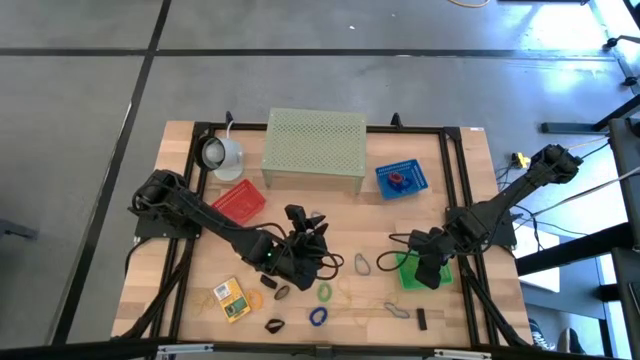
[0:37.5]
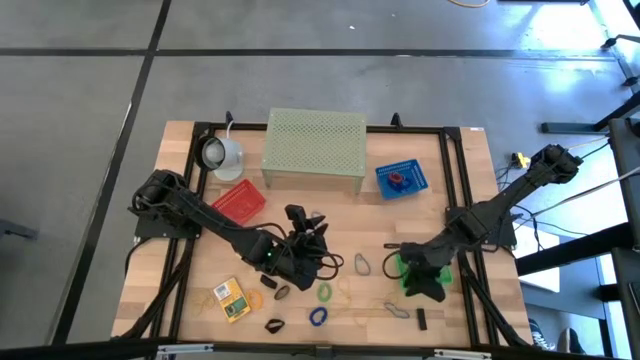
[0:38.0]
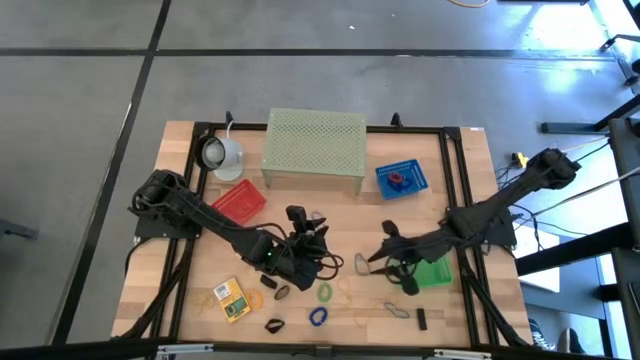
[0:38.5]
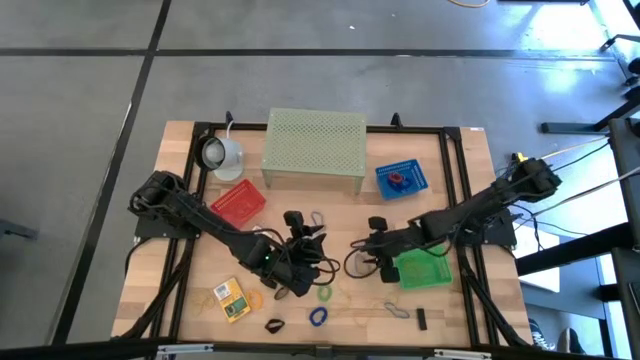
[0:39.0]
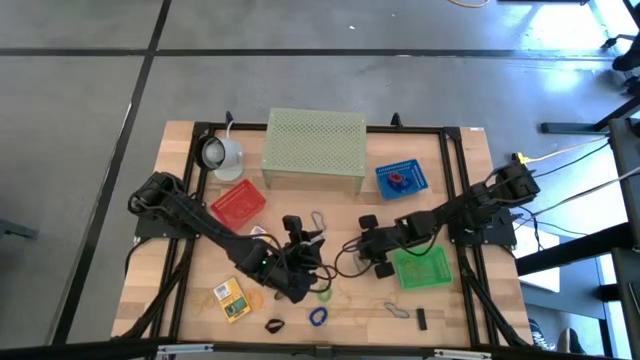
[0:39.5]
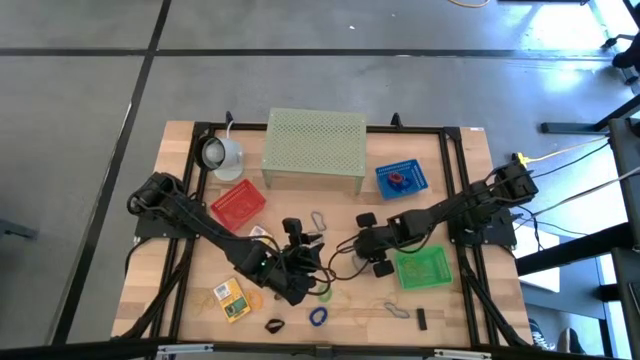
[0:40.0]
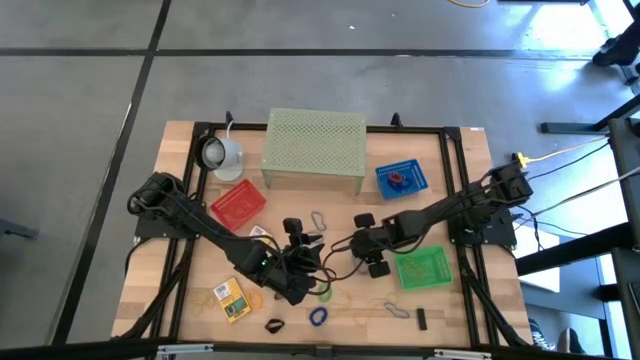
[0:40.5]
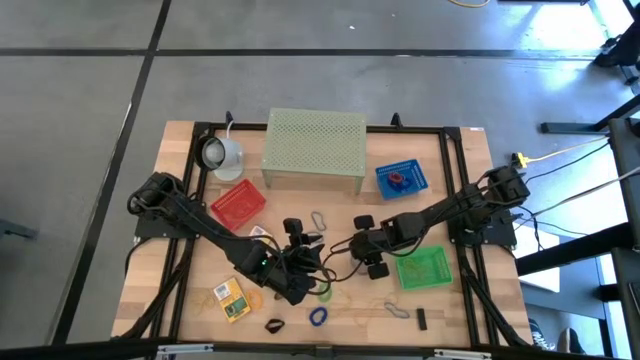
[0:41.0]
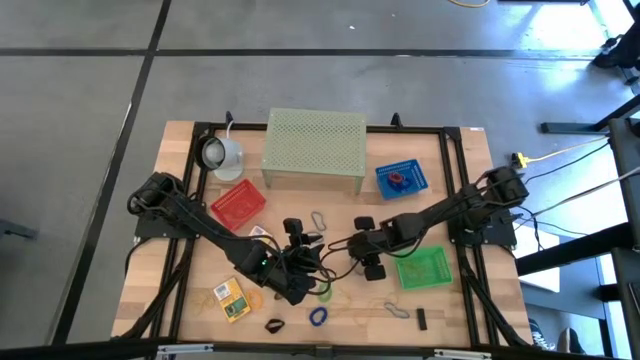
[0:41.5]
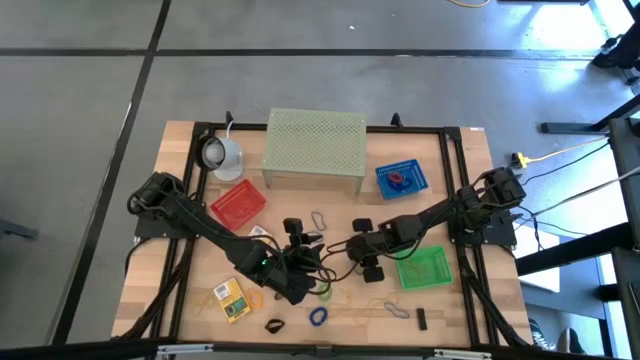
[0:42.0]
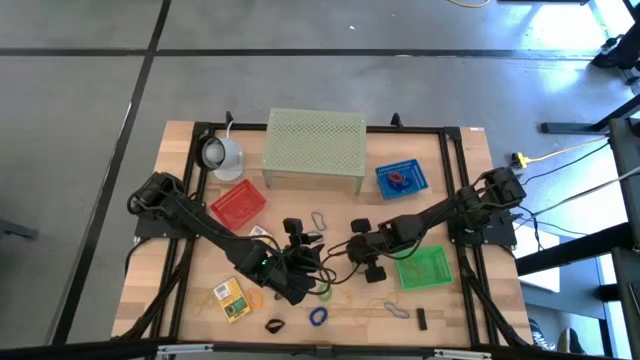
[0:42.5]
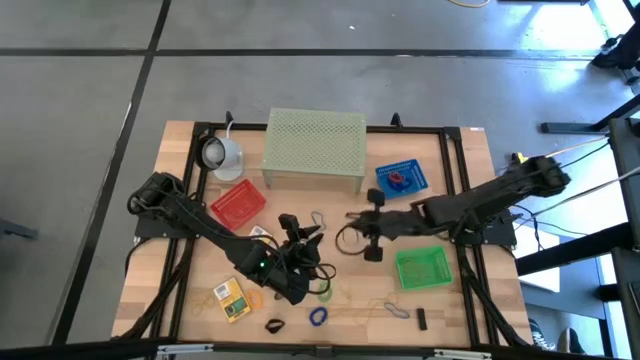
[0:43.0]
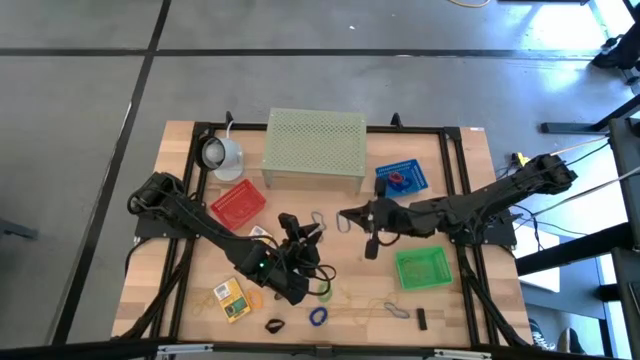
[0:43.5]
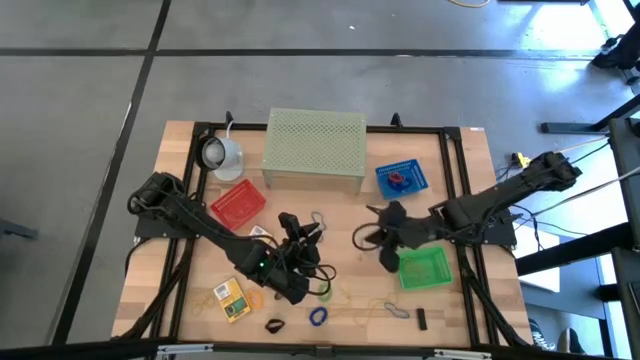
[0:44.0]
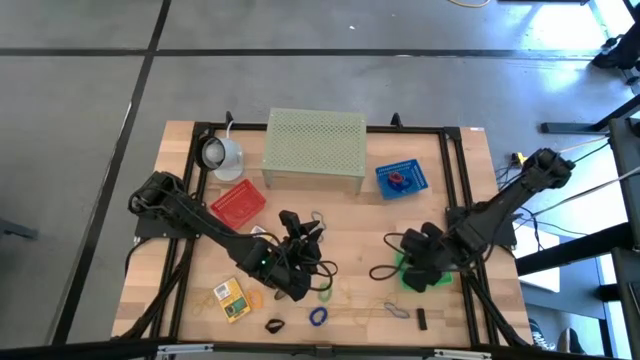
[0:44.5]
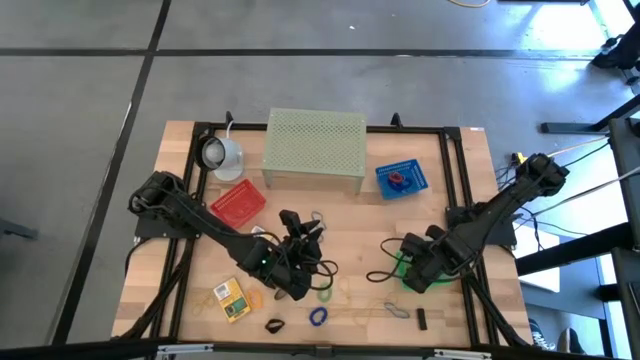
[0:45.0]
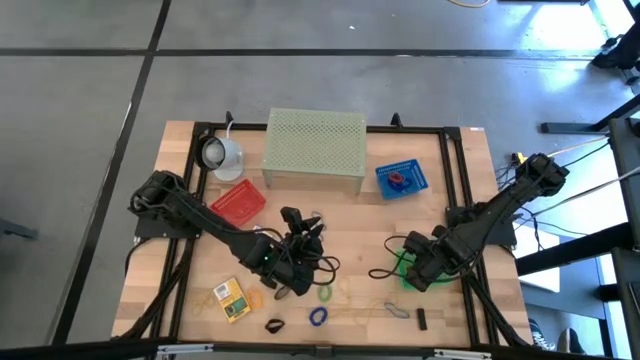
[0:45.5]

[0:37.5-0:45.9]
Task: Pick & Place Office Desk Supplies
Put the blue rubber band into the green bin

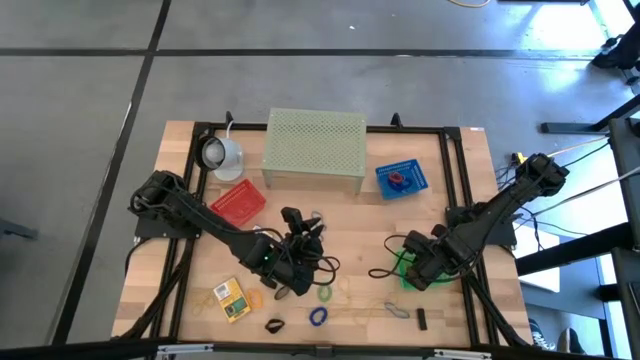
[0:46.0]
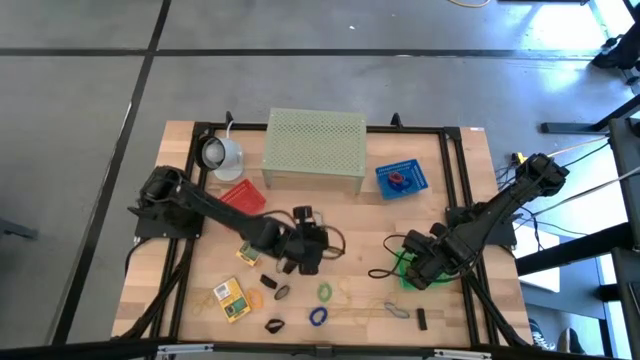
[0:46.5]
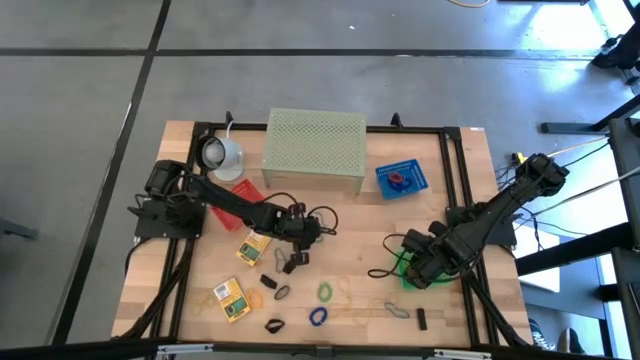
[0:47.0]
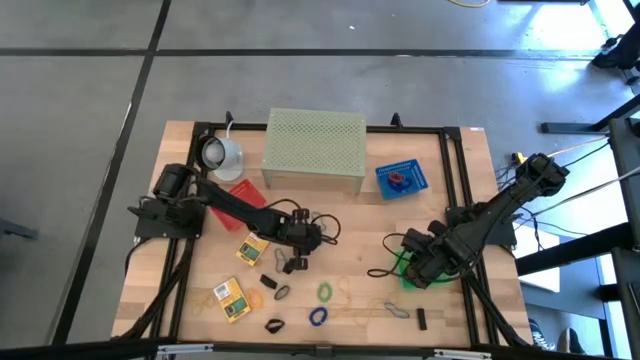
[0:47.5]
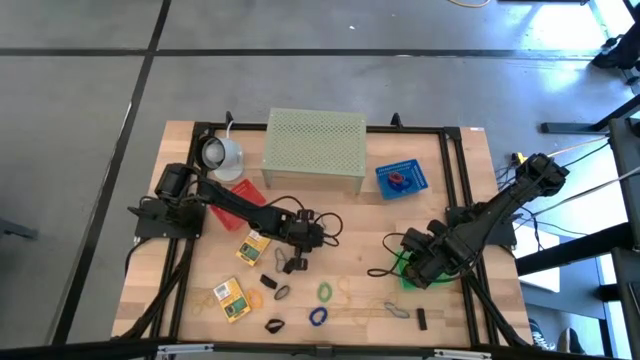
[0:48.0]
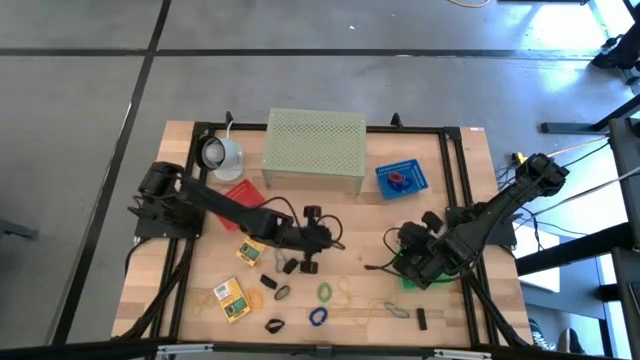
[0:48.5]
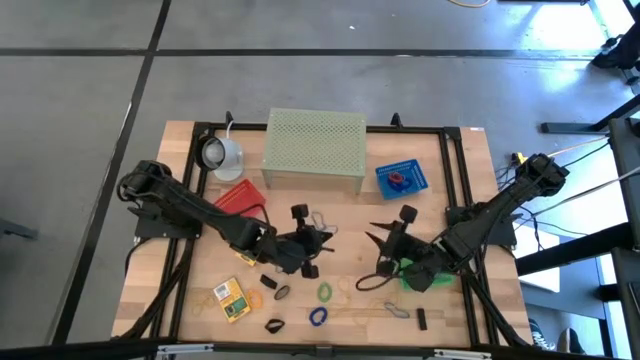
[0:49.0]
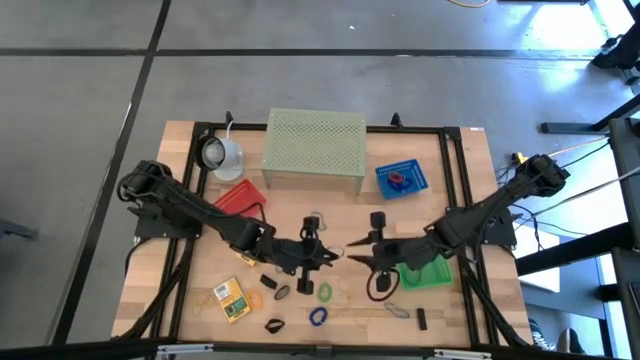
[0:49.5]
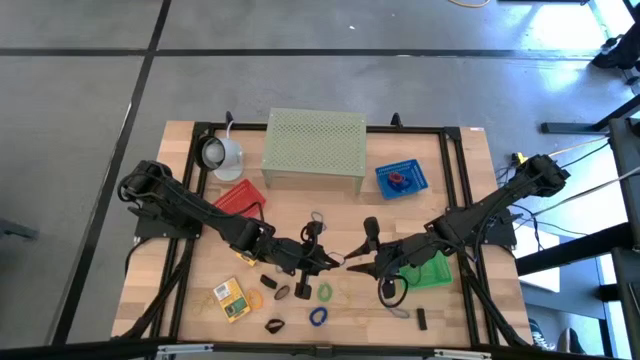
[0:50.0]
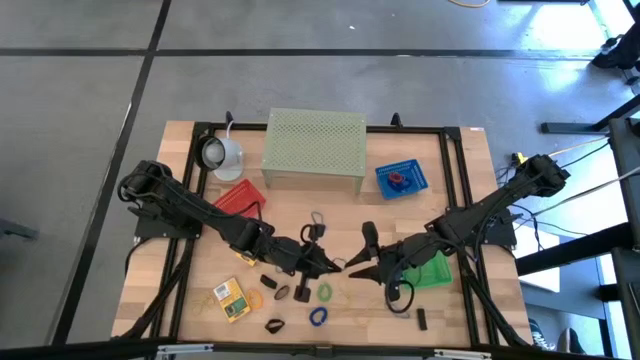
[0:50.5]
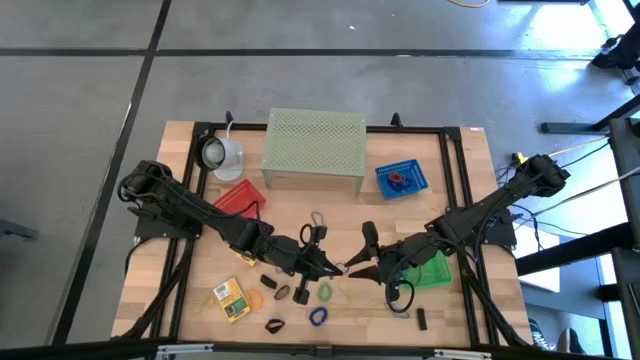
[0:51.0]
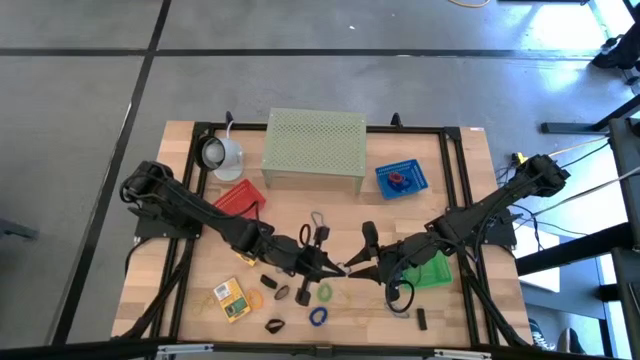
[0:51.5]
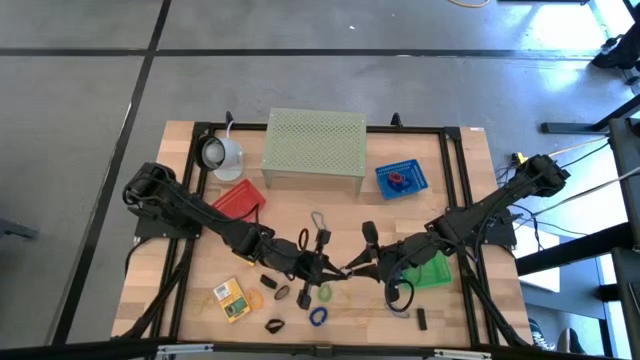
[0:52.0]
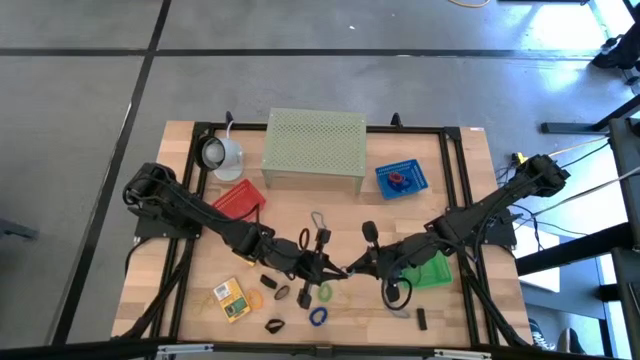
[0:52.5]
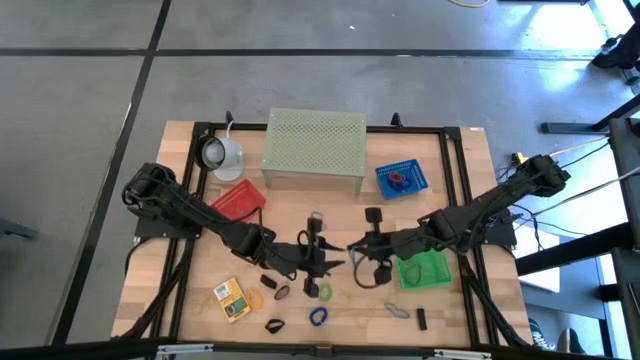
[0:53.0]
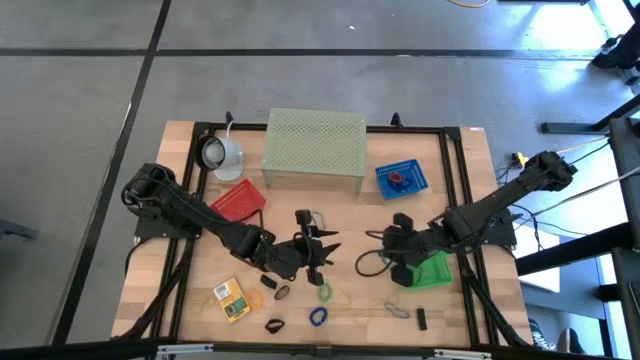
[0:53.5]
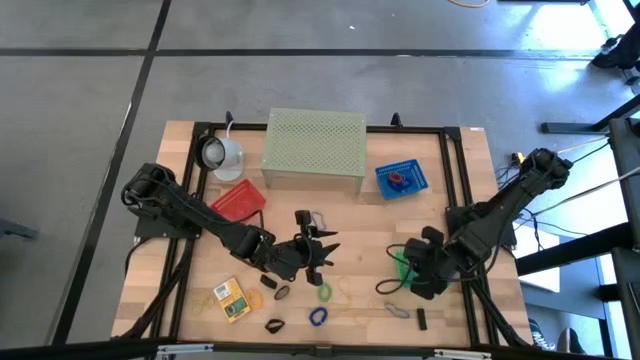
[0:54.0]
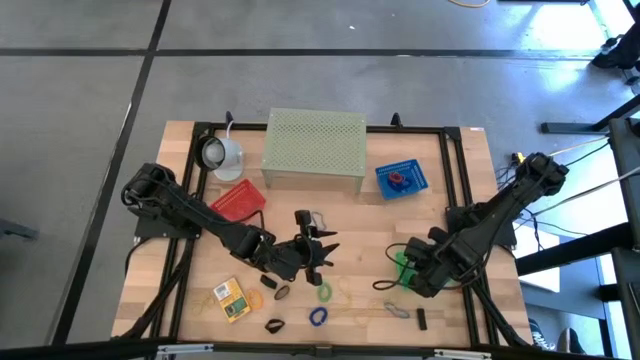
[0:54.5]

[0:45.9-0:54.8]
Put the blue rubber band into the green bin

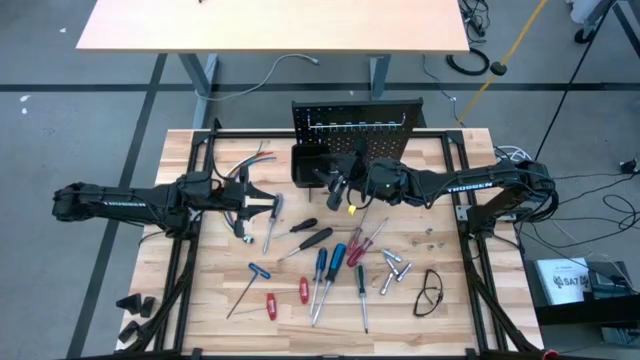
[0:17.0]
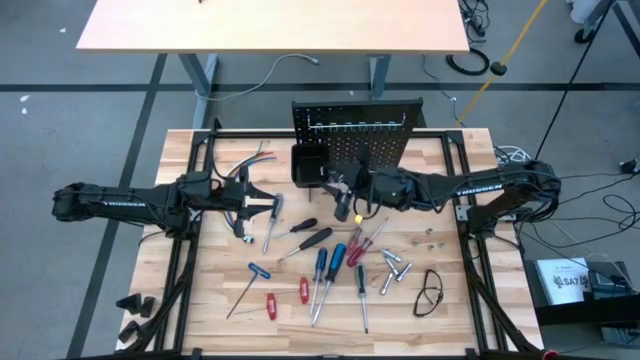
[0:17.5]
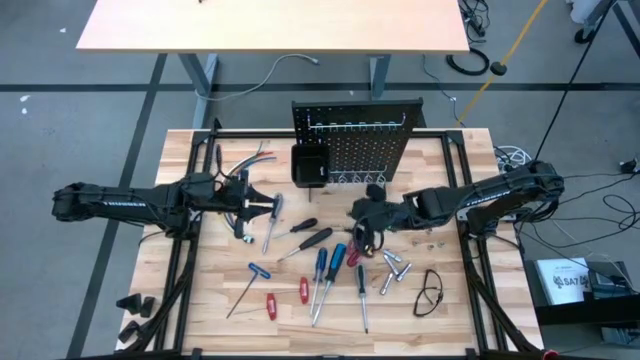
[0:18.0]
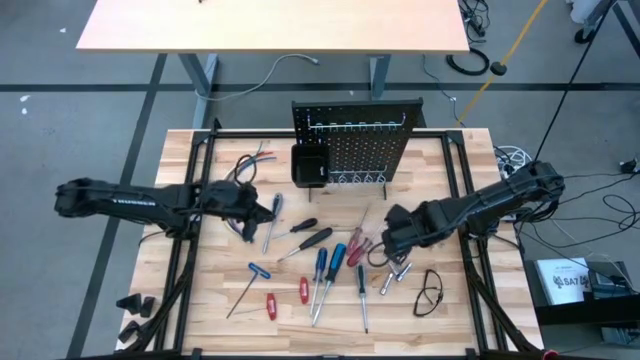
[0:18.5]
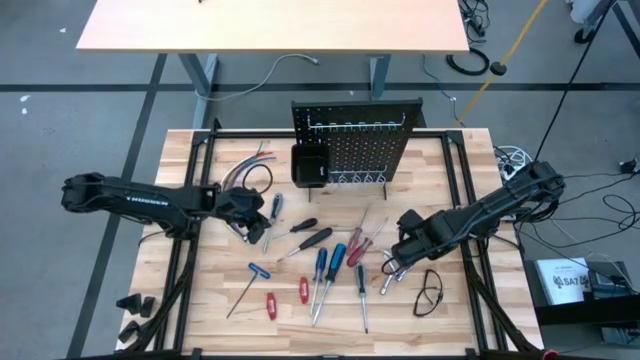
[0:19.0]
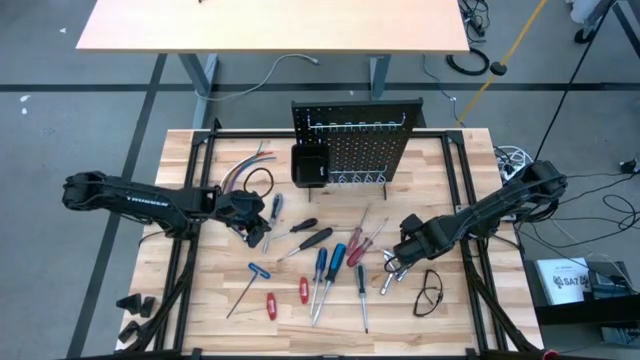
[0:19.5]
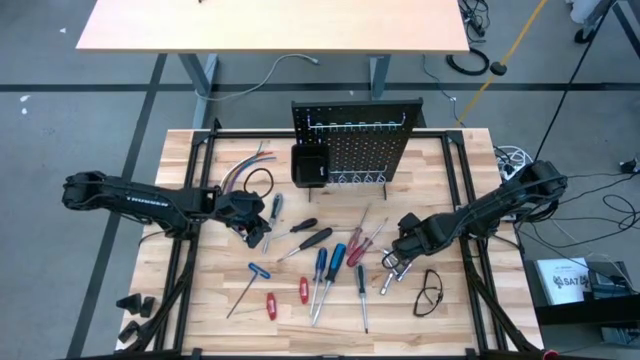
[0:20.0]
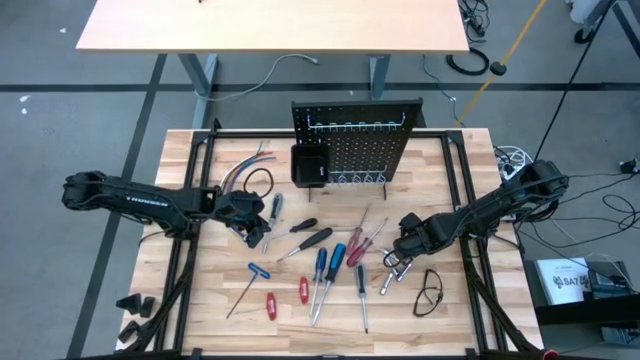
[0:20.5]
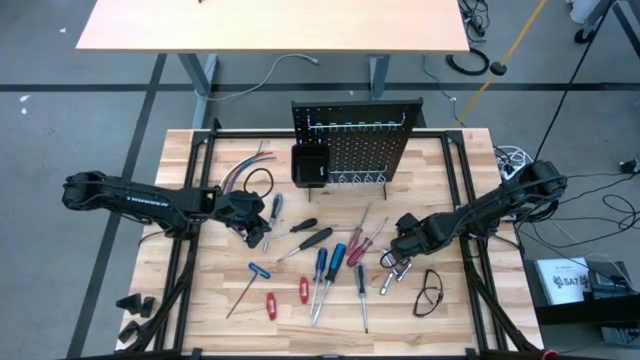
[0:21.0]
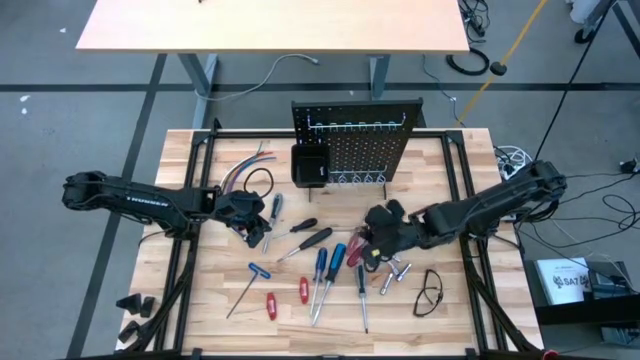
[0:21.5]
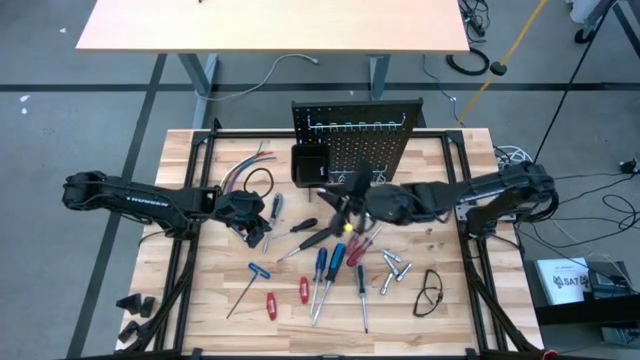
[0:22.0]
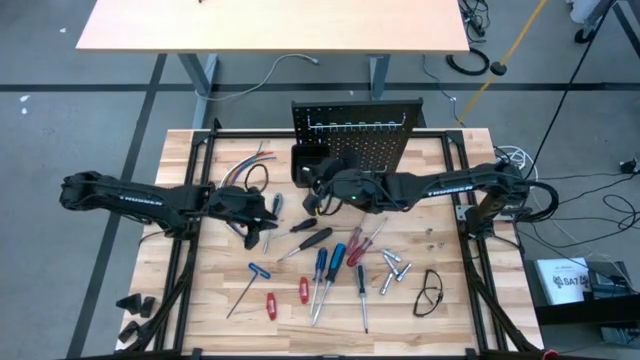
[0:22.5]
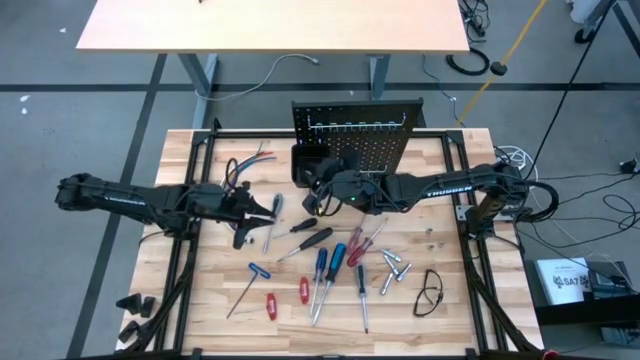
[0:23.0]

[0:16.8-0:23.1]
Task: Hang tools onto peg board
Put the socket in the black bin on the peg board
